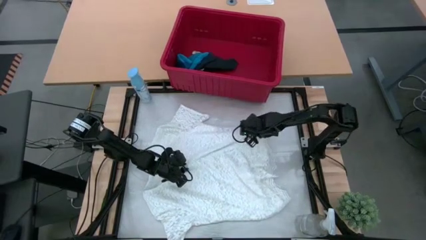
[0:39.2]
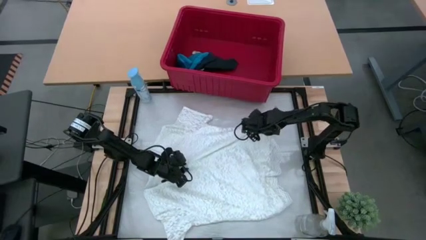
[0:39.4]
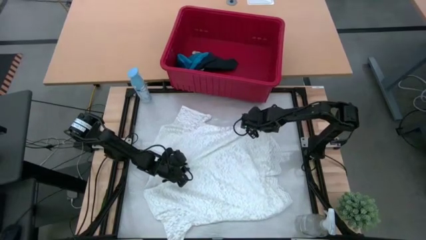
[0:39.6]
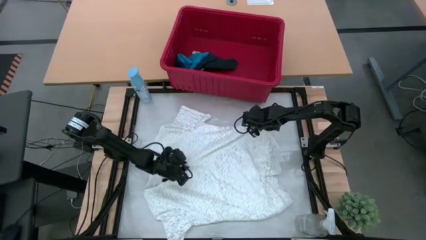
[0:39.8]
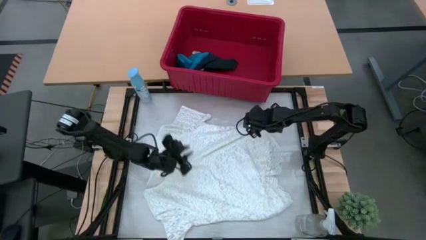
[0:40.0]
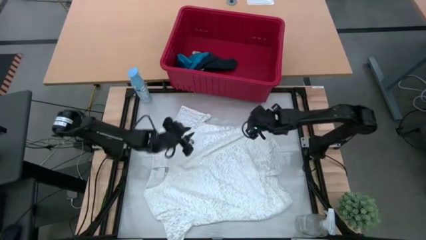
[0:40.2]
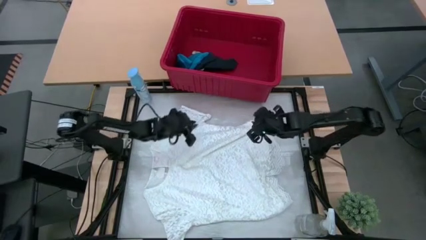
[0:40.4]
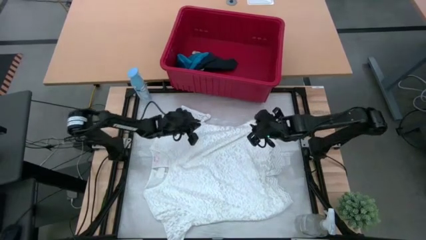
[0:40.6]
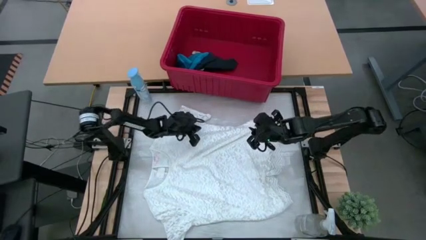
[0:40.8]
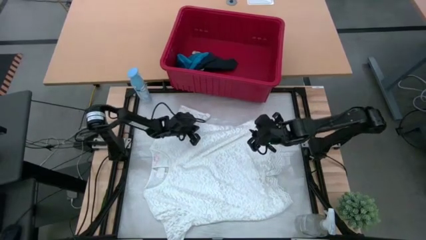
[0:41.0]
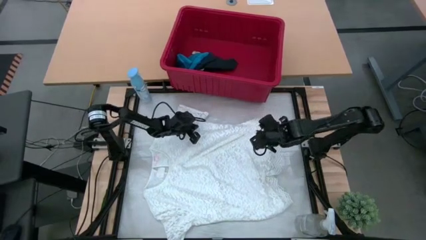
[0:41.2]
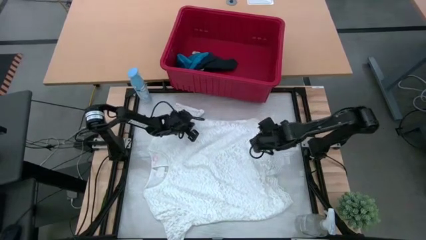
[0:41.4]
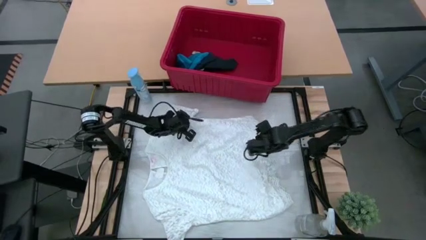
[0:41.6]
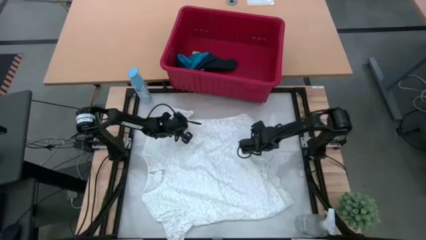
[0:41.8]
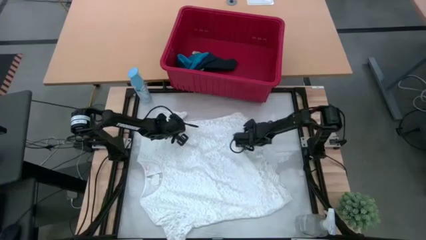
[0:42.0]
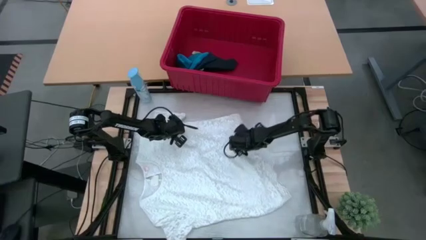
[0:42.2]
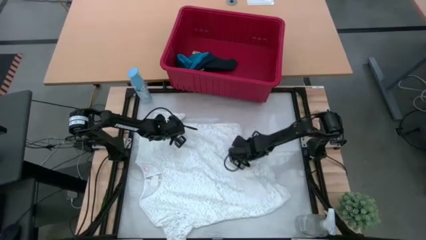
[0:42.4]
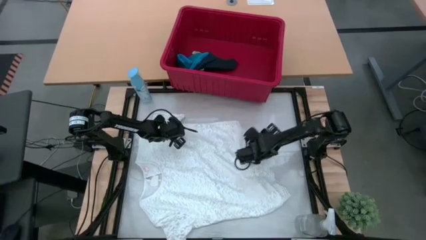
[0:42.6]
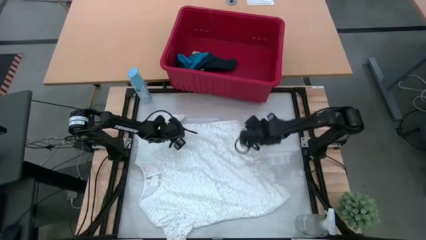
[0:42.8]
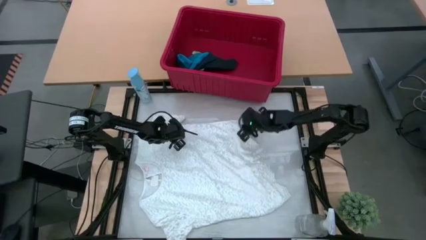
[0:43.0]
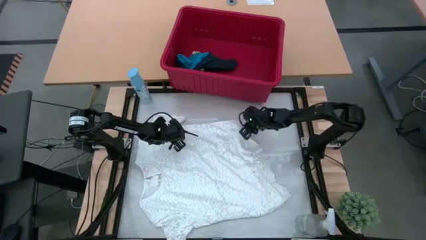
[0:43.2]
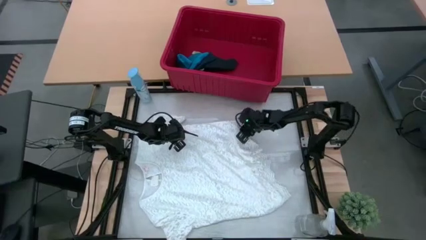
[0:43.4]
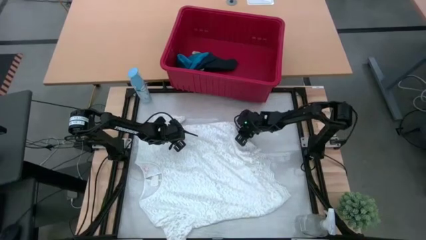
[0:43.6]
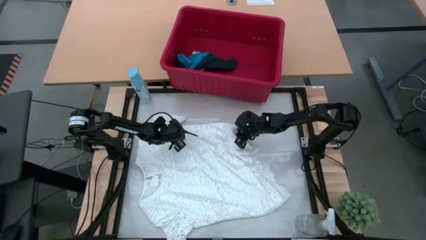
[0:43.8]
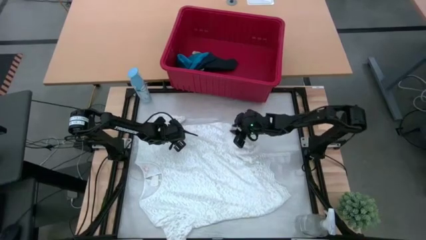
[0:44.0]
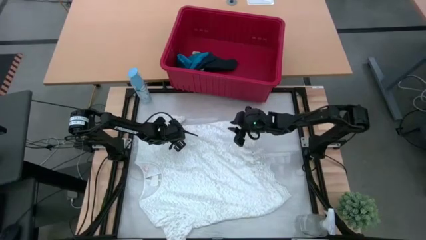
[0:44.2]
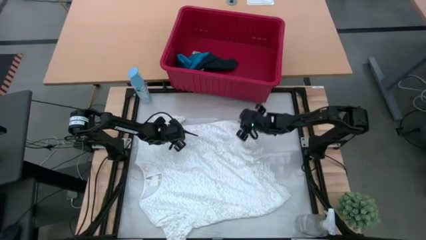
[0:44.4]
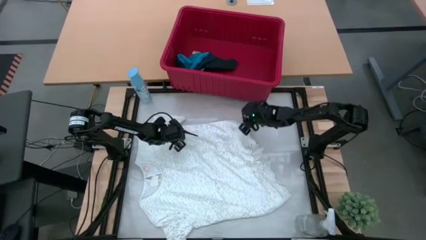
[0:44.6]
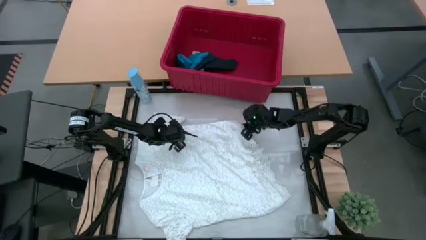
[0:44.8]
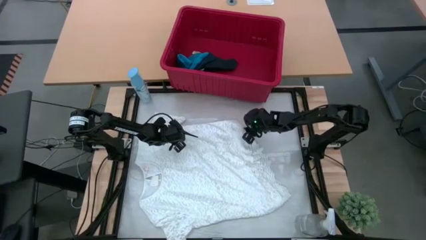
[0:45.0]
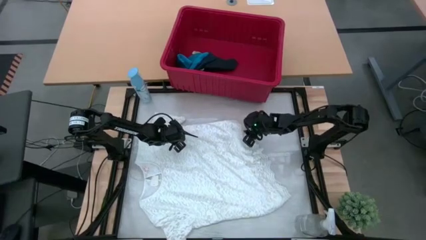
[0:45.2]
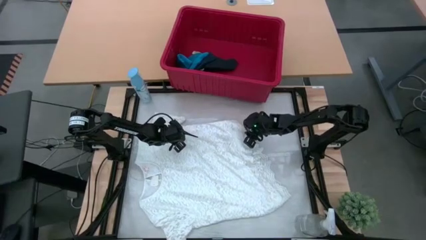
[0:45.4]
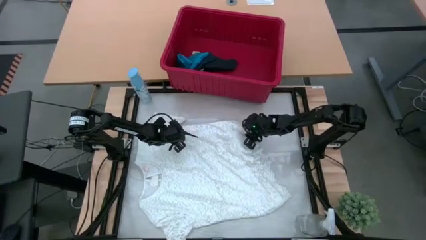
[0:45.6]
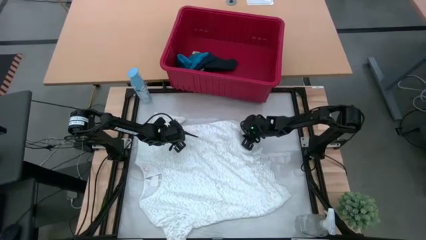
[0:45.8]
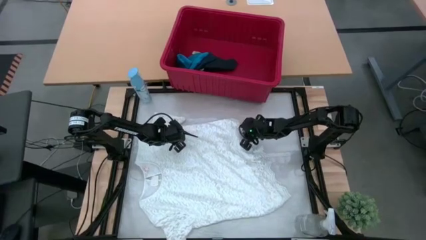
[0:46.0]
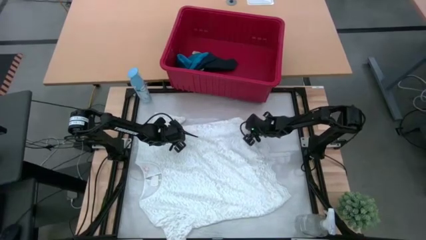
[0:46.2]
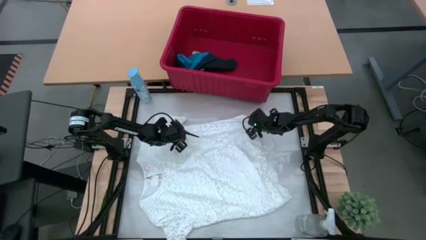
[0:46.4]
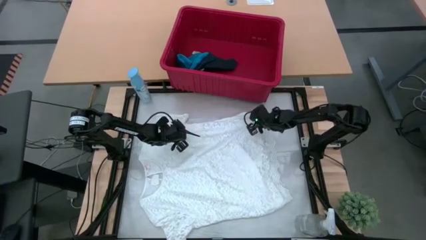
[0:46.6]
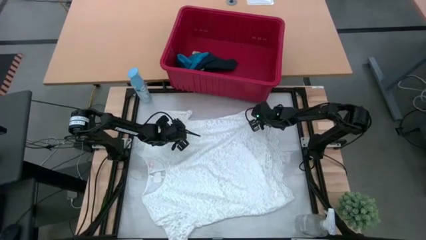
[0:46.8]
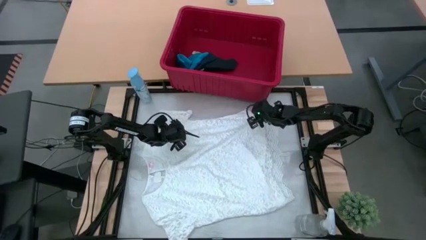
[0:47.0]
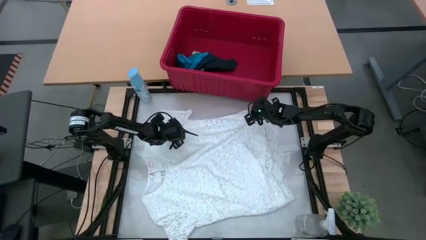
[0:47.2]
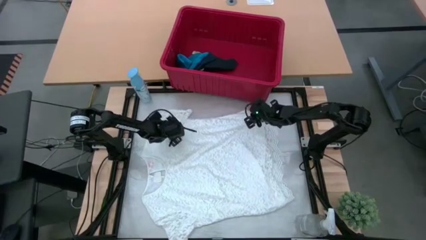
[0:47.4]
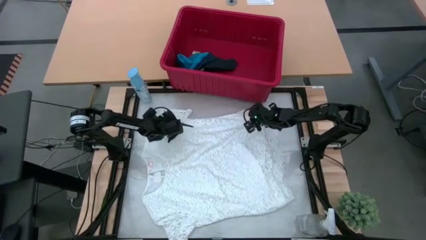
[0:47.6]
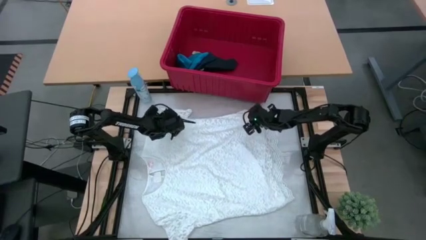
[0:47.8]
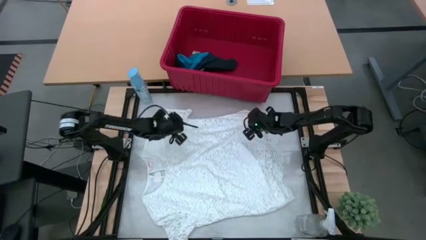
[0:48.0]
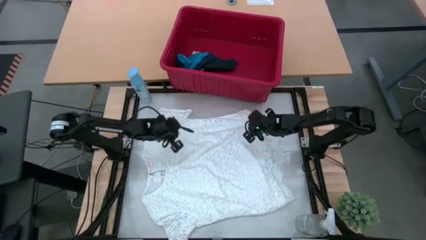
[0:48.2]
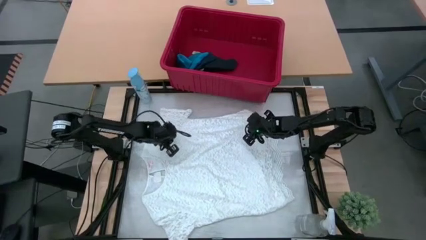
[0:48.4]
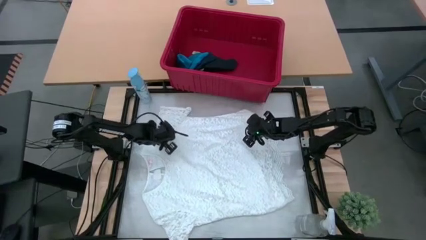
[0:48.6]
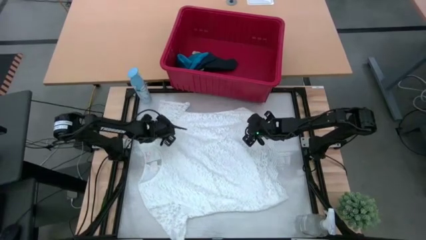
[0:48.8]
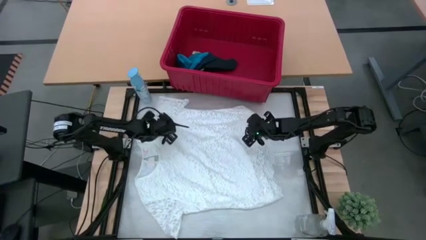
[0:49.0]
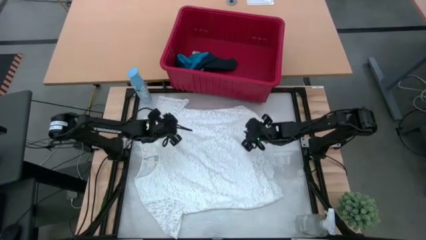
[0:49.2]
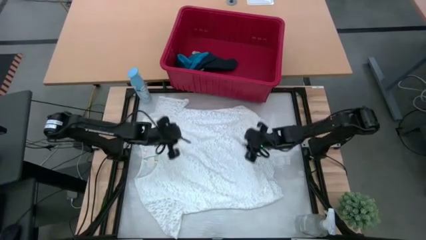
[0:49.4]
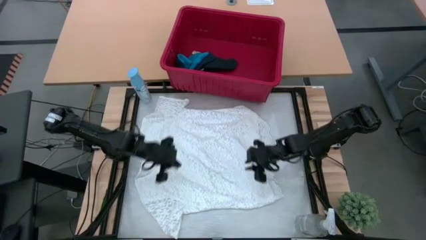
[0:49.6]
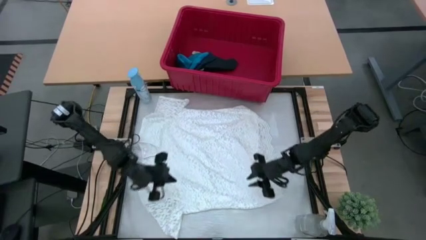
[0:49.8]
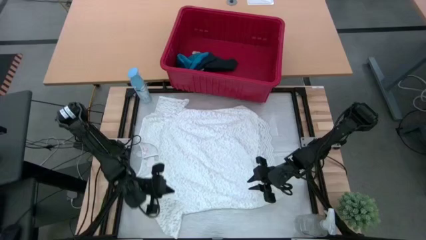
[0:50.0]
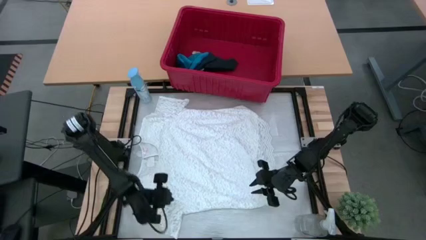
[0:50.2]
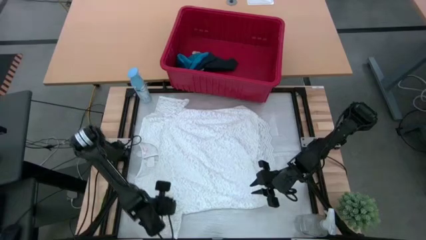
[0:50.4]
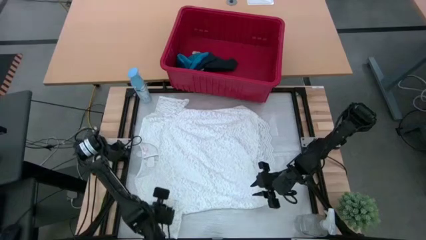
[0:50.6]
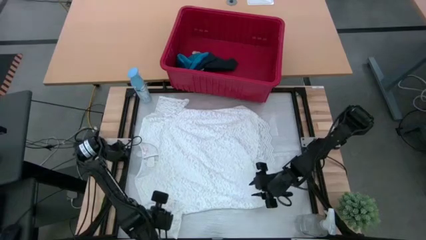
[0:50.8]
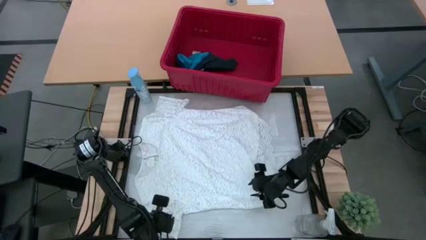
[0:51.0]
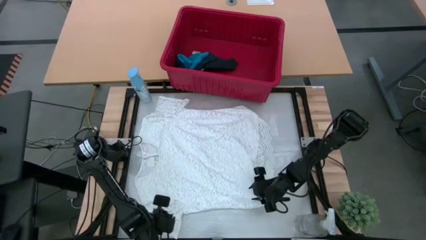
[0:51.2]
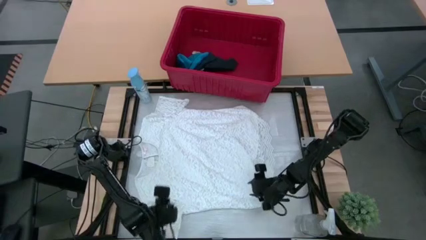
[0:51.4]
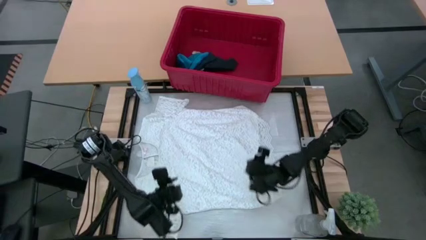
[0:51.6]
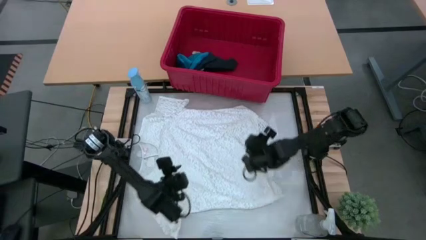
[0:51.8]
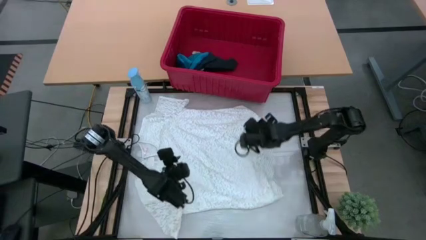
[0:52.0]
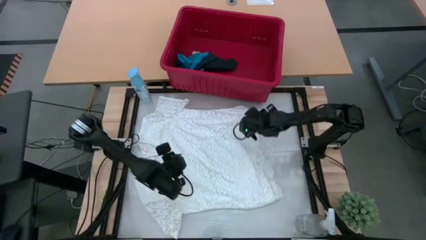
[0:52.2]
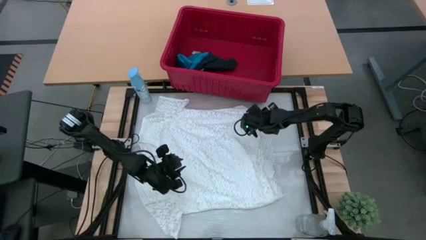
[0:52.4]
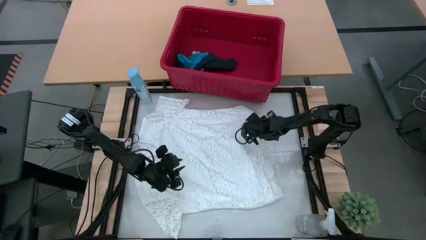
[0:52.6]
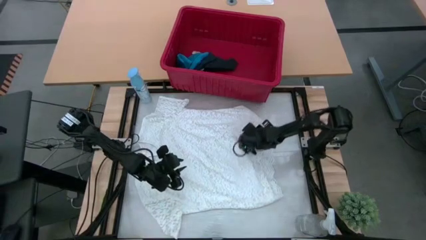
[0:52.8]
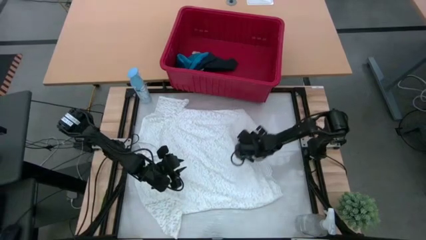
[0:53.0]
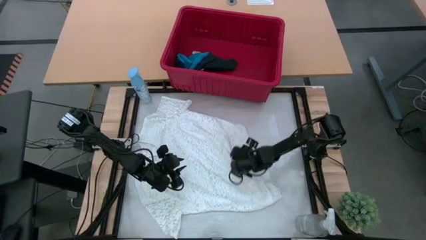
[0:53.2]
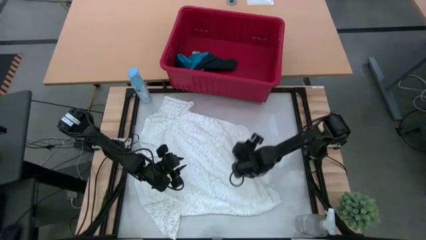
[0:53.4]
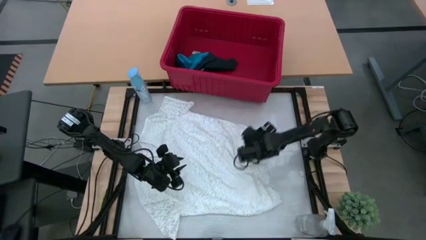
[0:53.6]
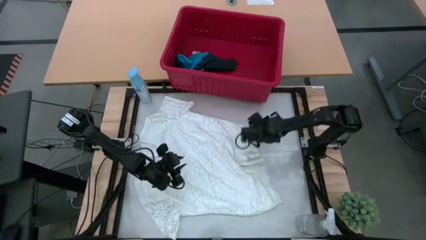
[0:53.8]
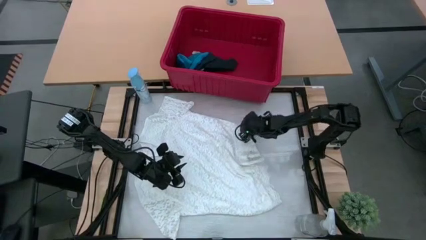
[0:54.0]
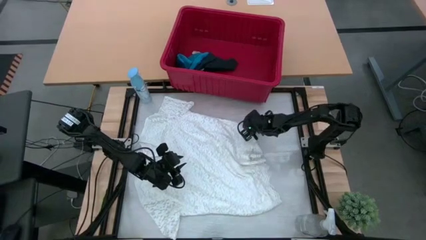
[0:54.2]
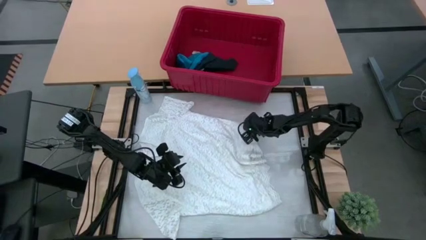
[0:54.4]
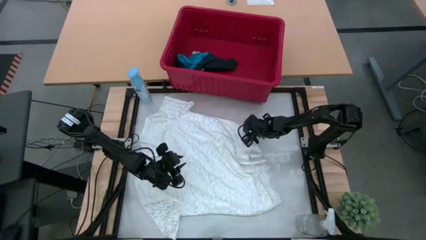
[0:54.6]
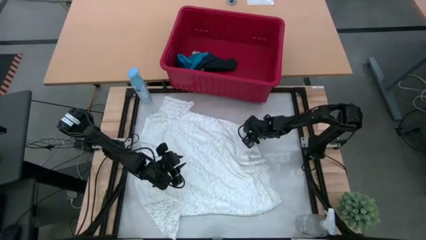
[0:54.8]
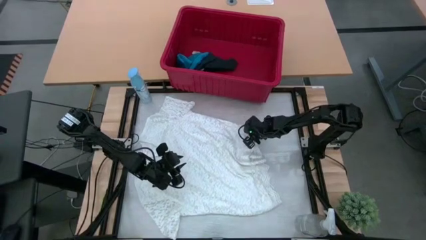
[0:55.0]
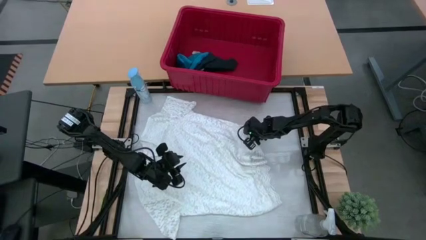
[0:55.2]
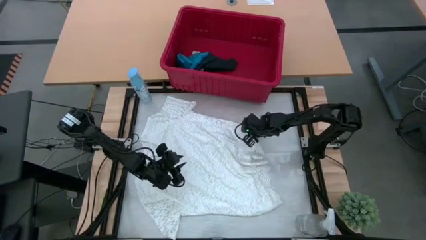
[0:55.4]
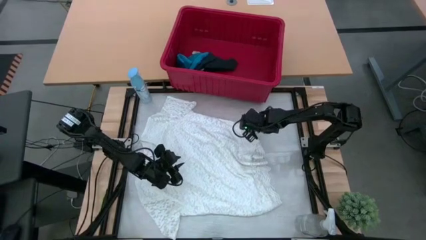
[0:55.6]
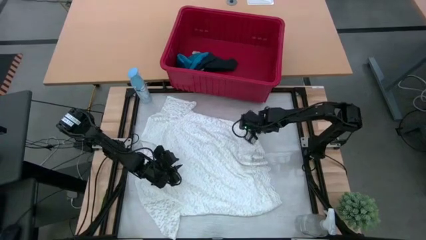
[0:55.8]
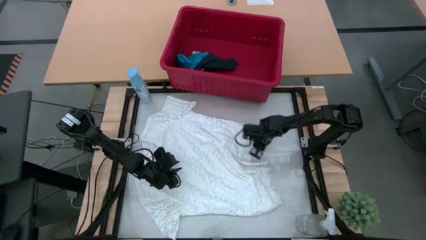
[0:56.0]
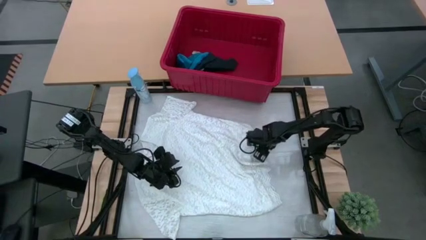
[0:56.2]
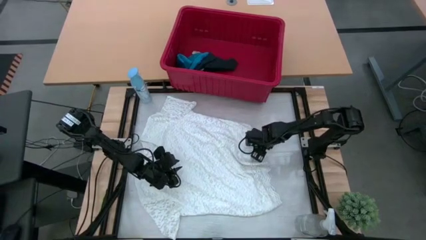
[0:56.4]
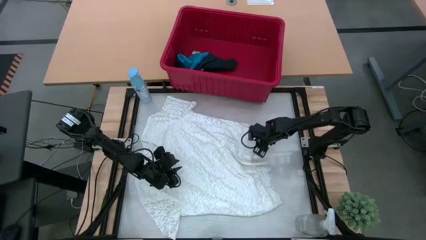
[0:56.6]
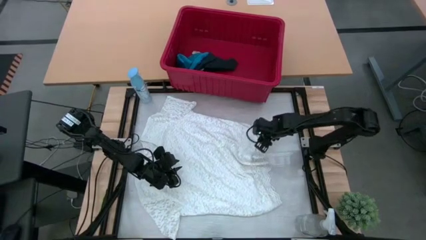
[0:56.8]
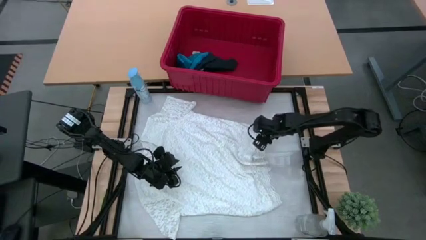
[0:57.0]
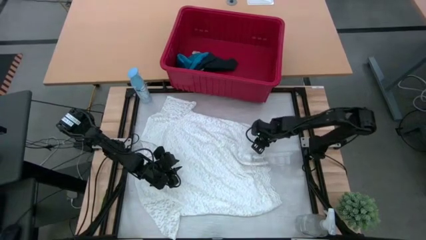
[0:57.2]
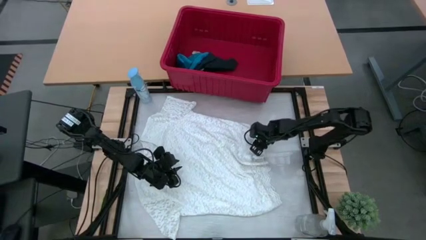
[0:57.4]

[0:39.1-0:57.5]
Task: Fold Laundry from Bin
Fold the white shirt
